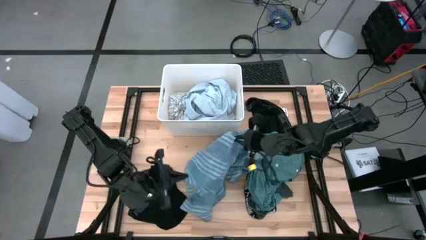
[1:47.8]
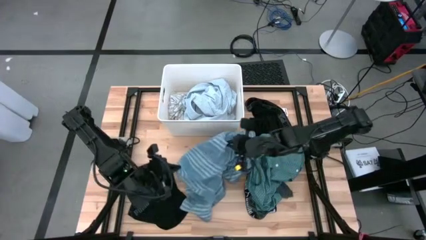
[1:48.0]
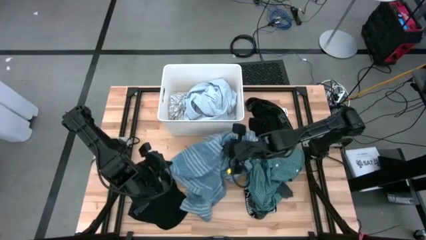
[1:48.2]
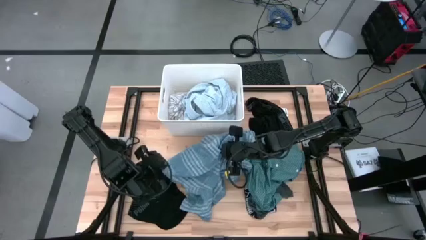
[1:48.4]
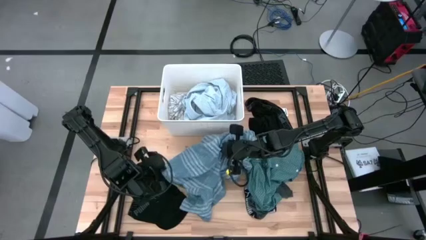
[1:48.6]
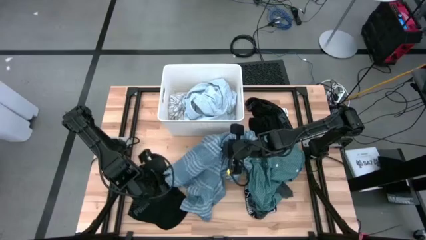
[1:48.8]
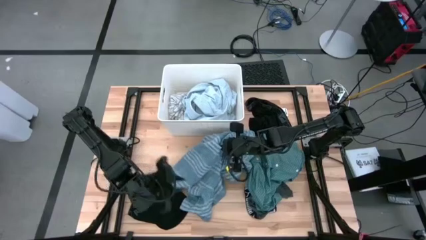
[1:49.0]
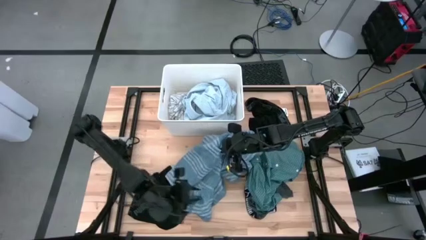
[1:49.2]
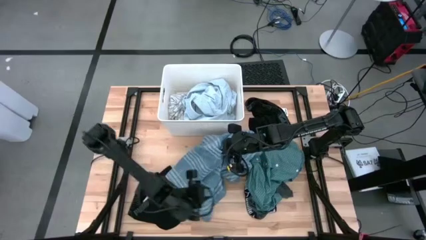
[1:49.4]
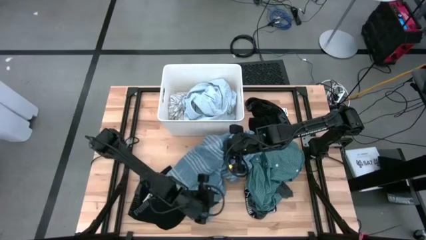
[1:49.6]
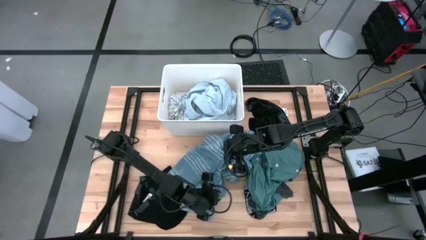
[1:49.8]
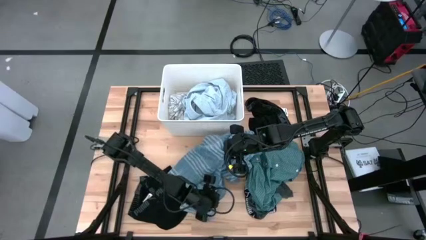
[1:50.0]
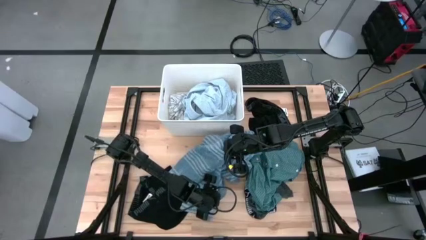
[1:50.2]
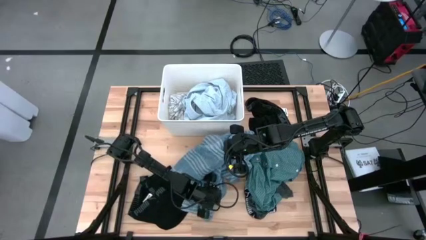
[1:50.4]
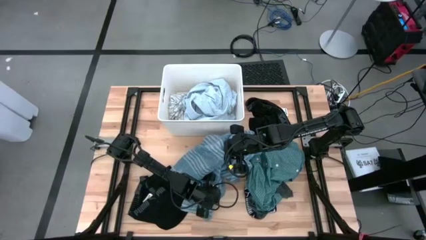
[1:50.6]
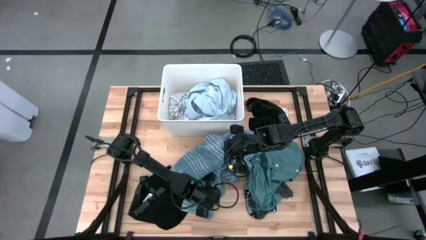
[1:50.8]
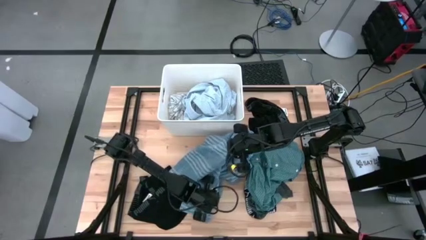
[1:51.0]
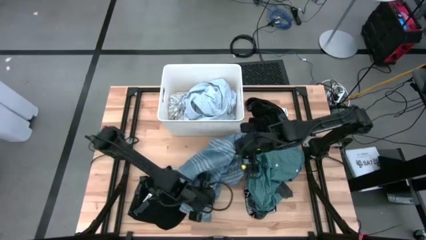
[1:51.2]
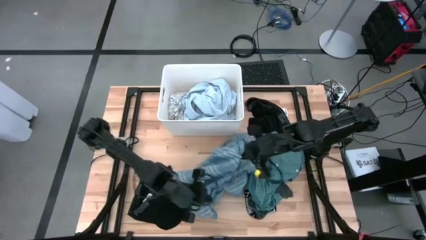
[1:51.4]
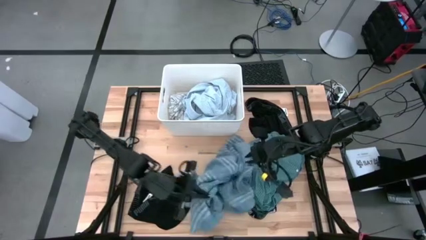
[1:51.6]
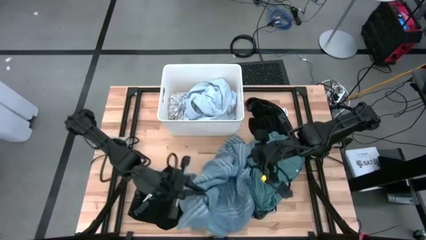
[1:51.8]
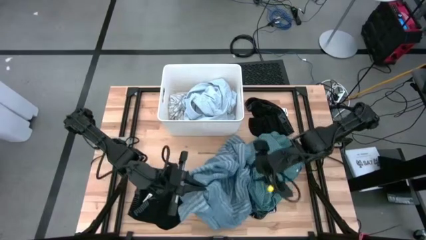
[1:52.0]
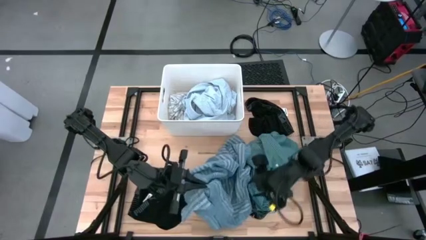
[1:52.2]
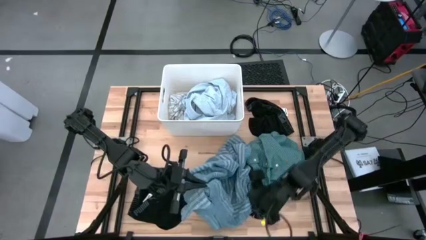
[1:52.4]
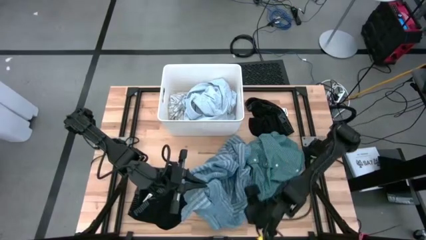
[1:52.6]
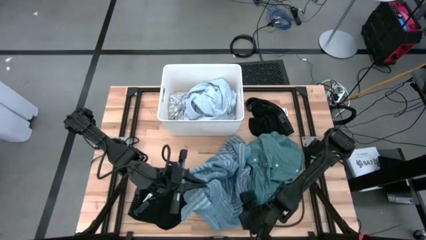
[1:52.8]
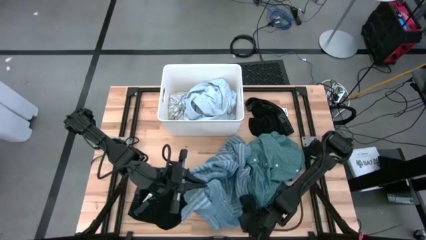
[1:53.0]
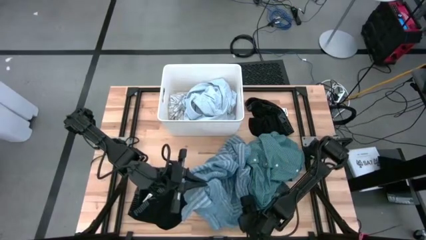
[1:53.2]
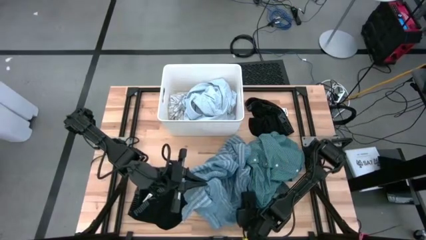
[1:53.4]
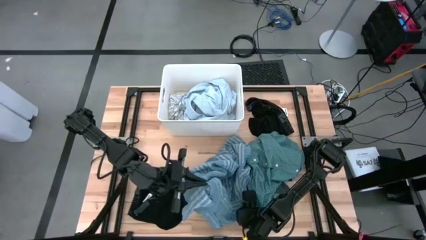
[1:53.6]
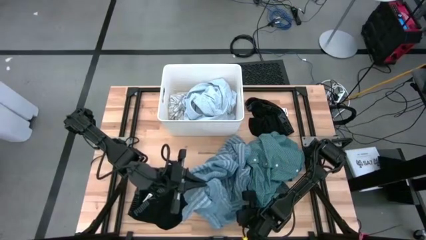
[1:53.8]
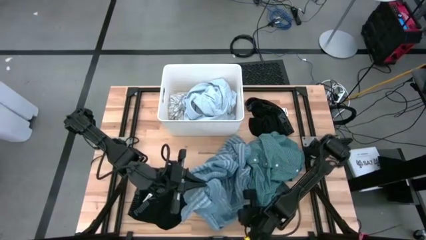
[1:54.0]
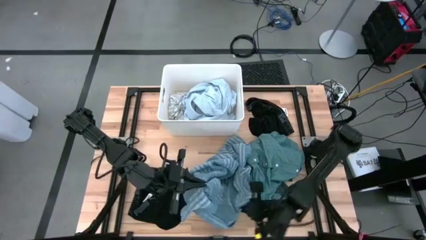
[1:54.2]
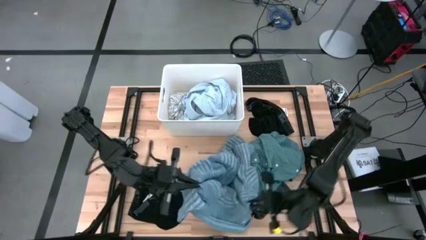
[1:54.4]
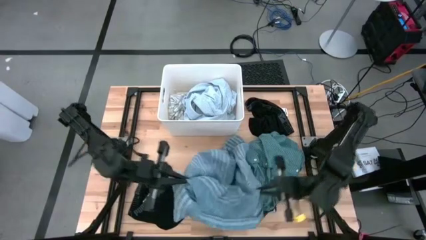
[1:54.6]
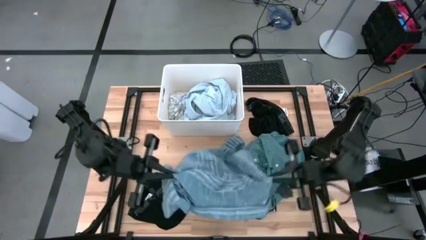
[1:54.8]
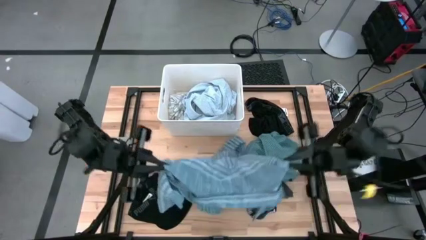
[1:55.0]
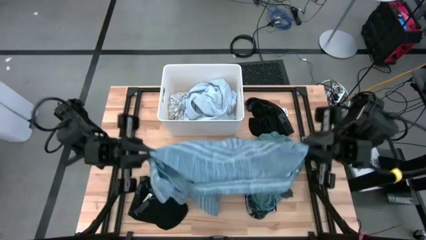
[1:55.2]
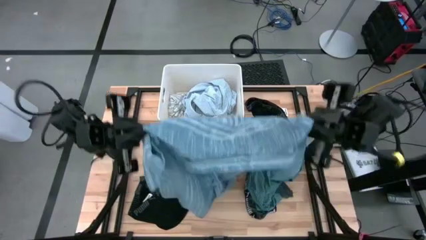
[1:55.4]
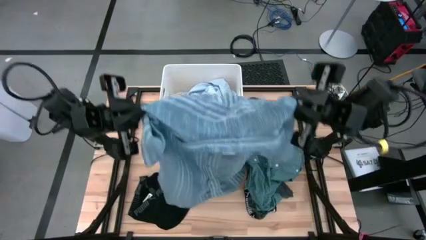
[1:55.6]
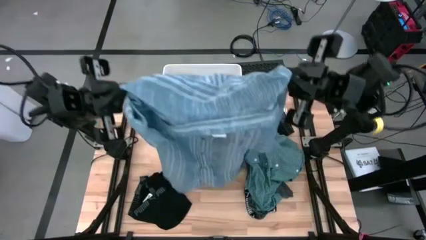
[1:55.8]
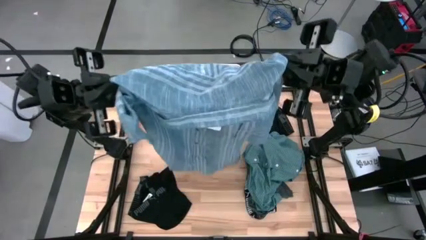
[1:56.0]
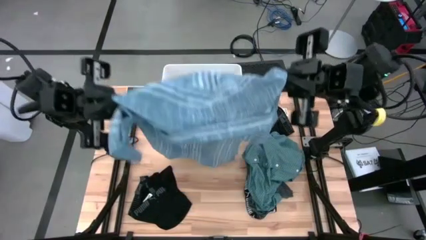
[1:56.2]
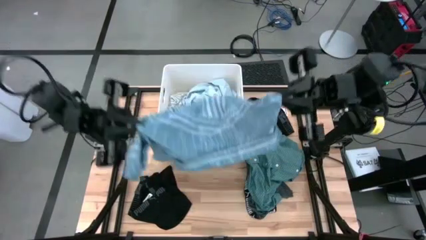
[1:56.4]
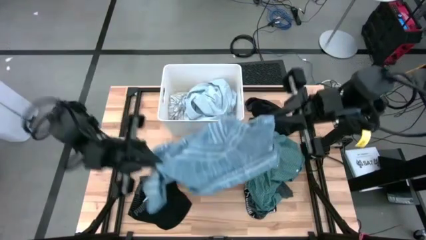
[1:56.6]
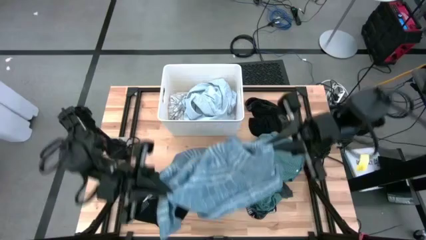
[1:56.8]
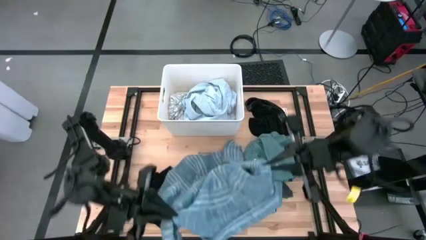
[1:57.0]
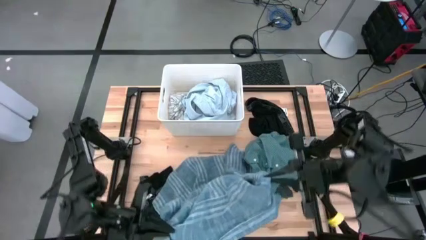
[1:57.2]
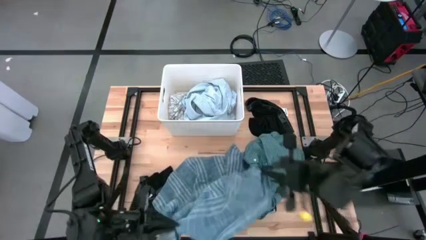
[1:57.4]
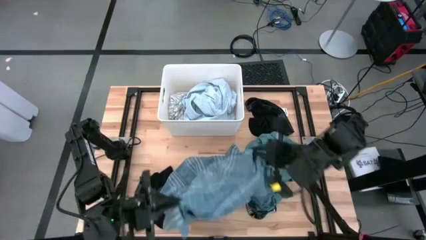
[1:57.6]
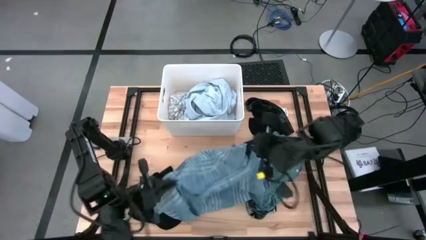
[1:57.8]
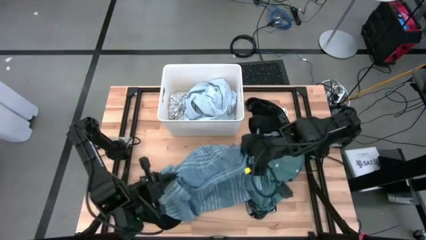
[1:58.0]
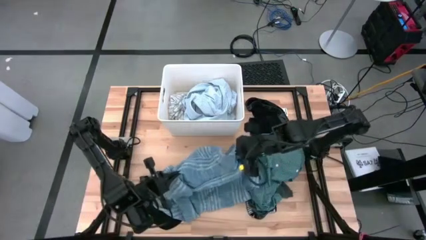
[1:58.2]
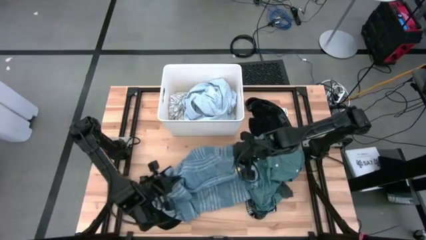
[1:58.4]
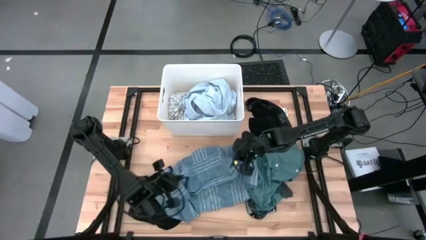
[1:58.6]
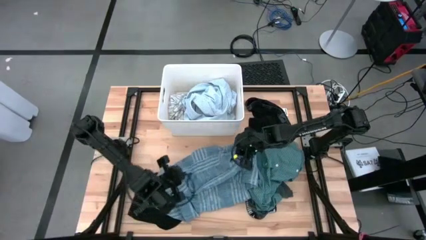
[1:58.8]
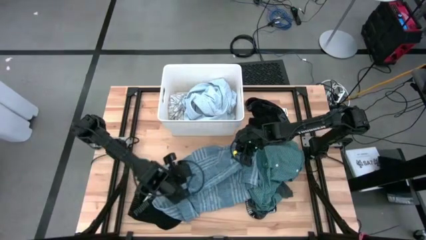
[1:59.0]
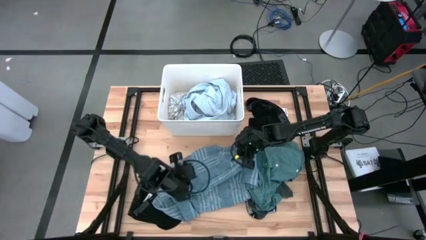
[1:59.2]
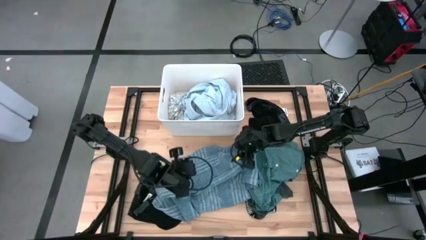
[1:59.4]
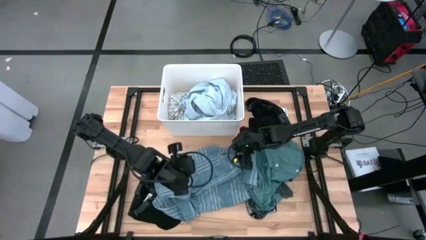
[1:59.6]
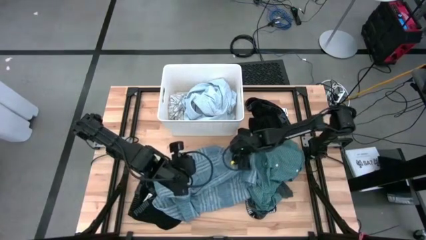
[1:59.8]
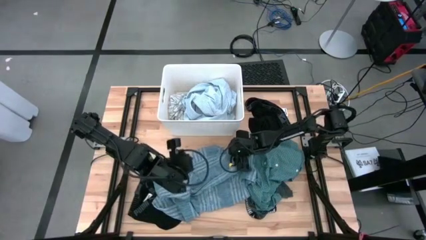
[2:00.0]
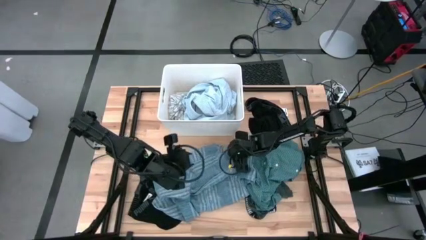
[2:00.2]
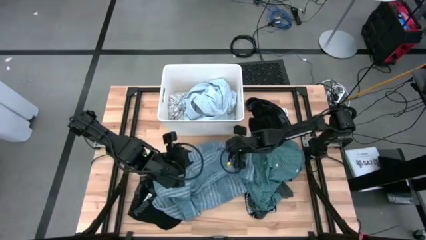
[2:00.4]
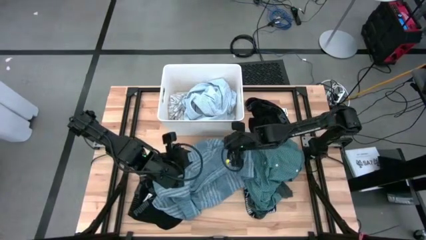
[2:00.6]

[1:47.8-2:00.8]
Task: Sort clothes
Put the blue striped shirt into the white bin
